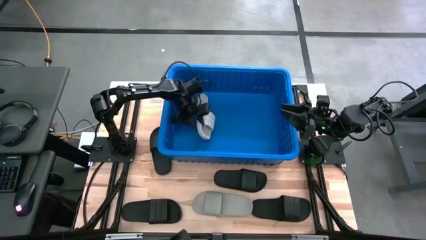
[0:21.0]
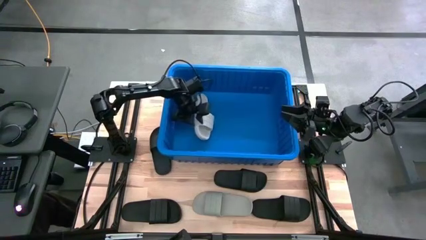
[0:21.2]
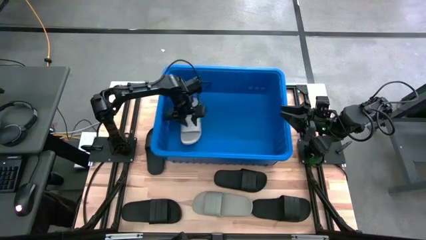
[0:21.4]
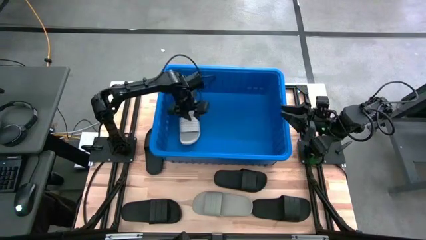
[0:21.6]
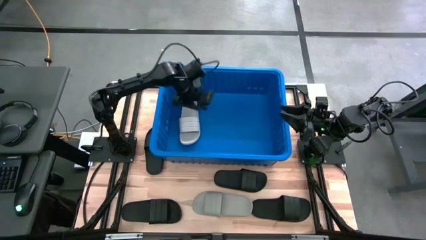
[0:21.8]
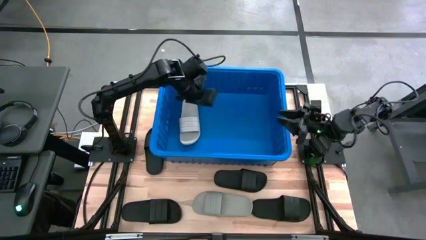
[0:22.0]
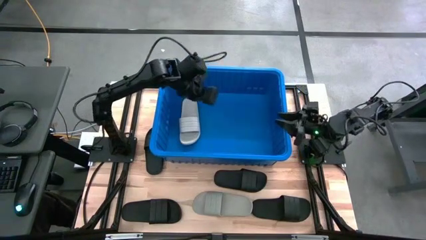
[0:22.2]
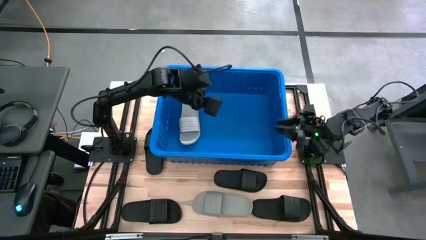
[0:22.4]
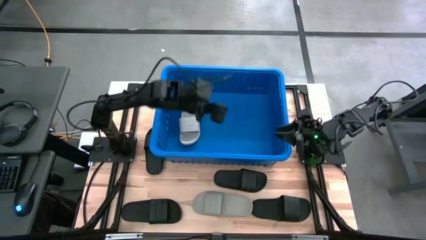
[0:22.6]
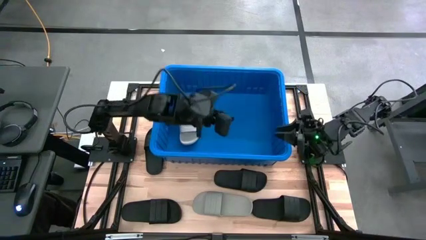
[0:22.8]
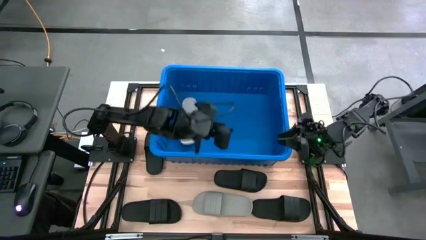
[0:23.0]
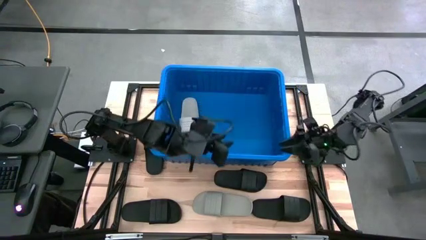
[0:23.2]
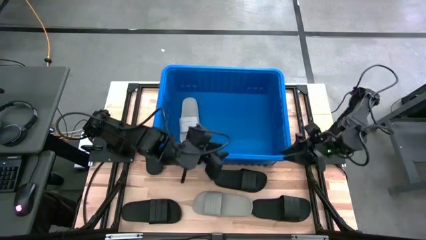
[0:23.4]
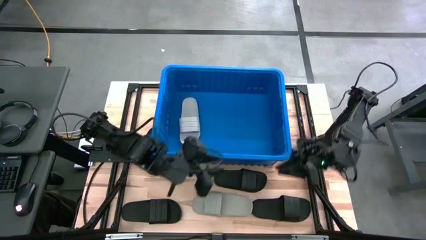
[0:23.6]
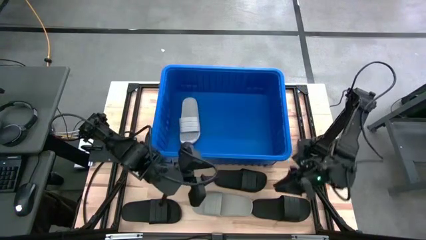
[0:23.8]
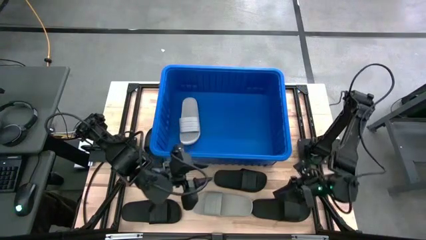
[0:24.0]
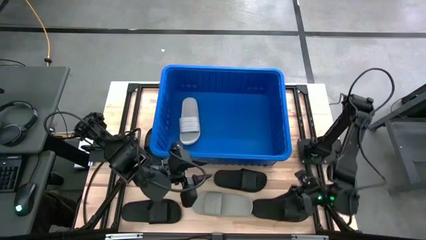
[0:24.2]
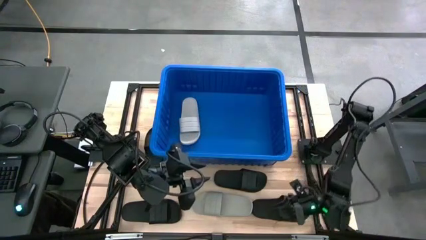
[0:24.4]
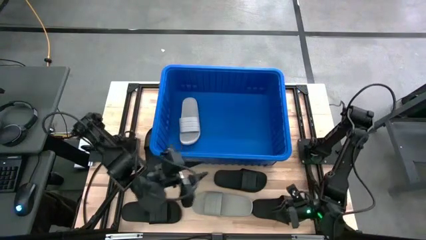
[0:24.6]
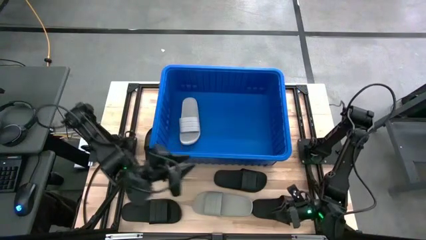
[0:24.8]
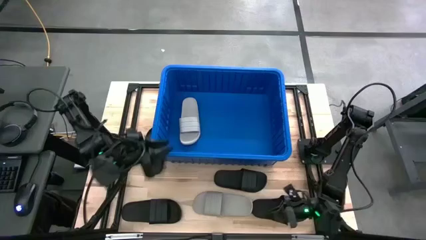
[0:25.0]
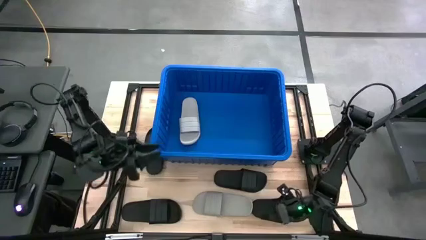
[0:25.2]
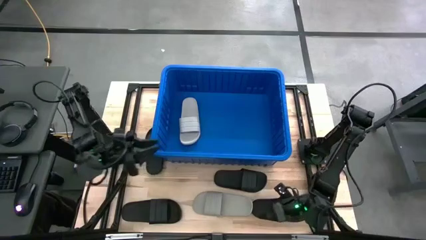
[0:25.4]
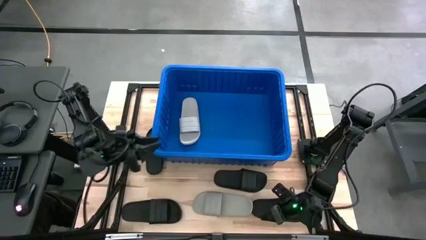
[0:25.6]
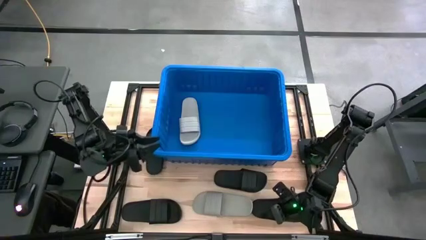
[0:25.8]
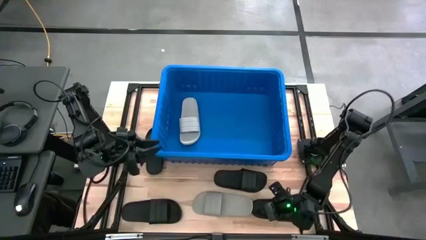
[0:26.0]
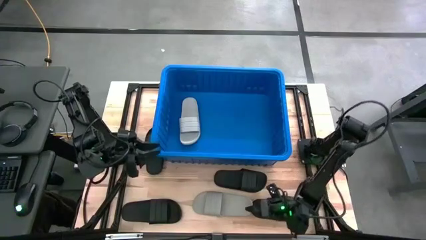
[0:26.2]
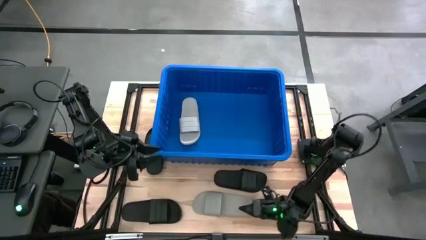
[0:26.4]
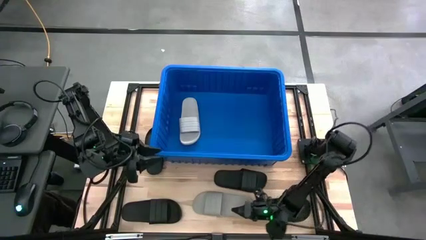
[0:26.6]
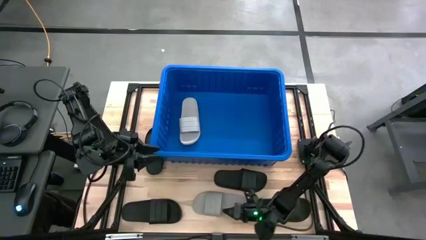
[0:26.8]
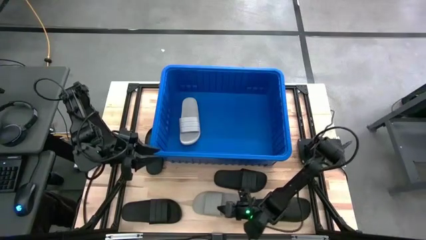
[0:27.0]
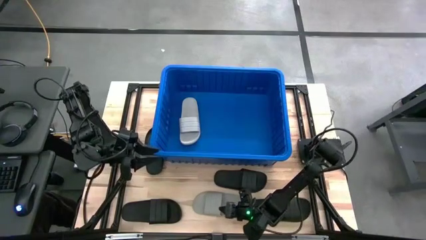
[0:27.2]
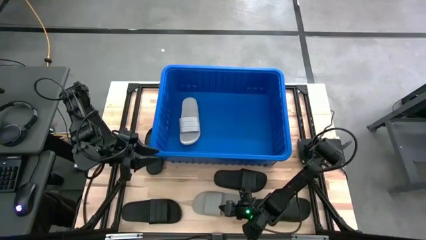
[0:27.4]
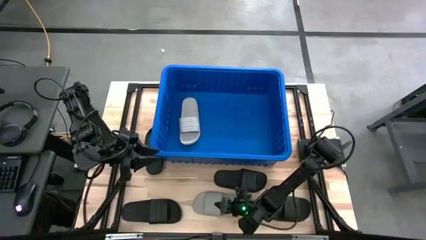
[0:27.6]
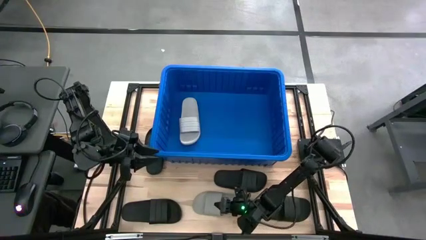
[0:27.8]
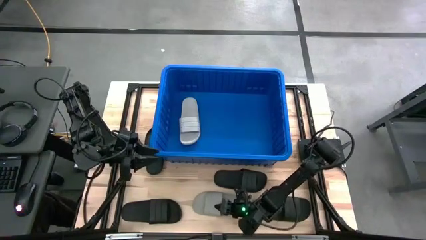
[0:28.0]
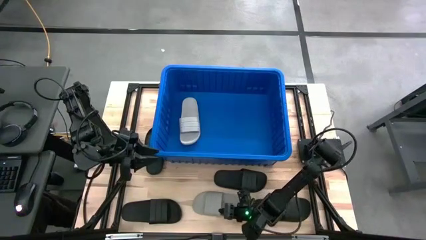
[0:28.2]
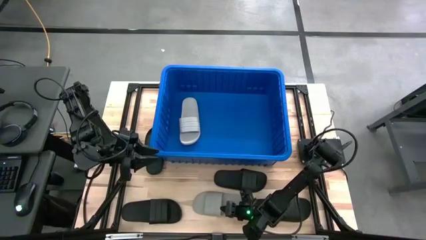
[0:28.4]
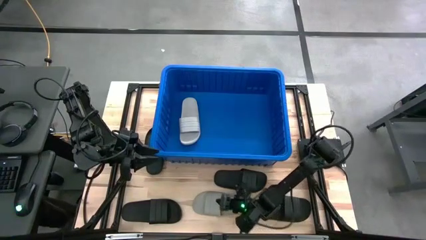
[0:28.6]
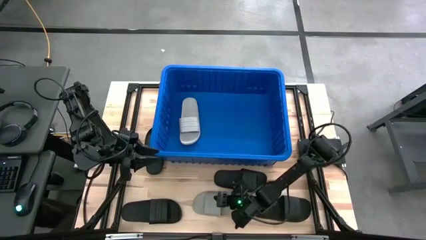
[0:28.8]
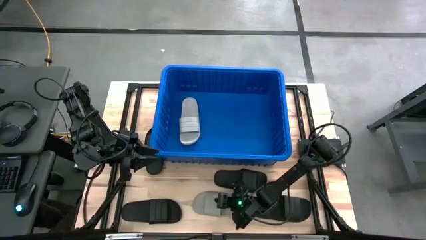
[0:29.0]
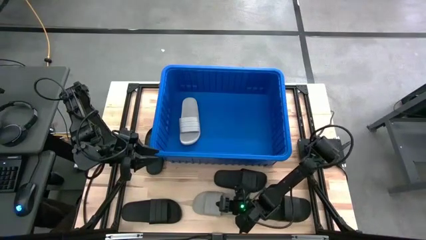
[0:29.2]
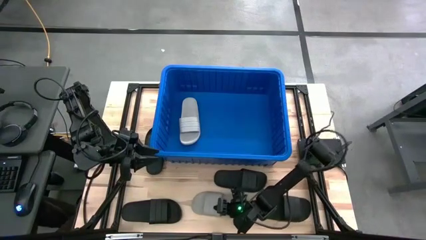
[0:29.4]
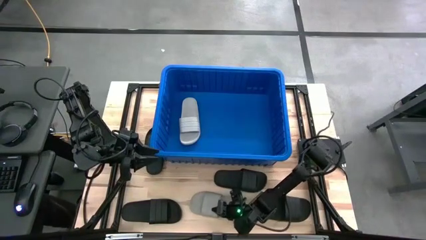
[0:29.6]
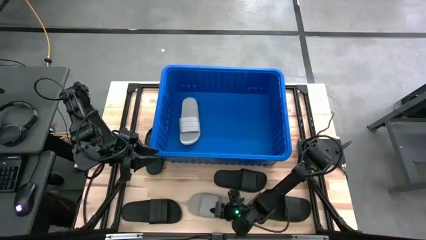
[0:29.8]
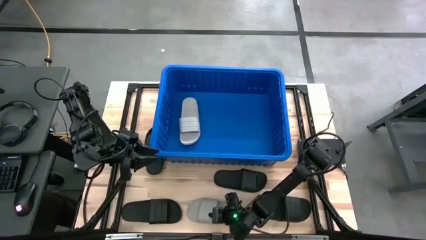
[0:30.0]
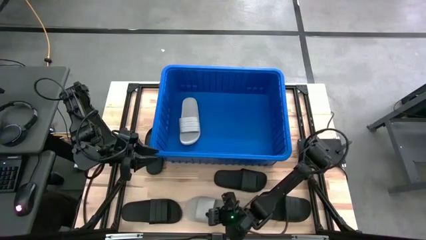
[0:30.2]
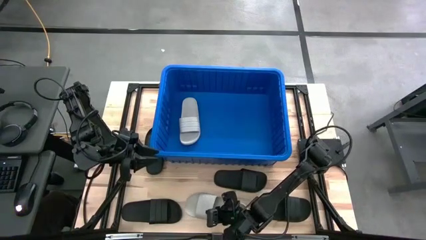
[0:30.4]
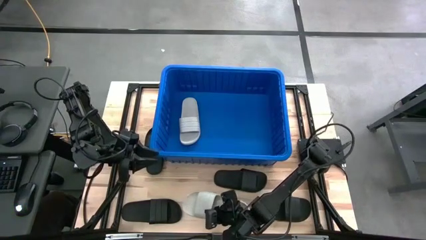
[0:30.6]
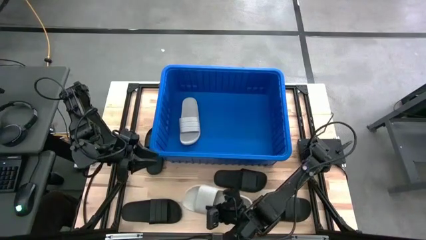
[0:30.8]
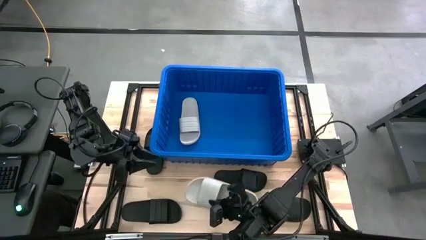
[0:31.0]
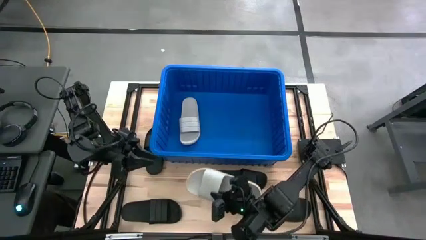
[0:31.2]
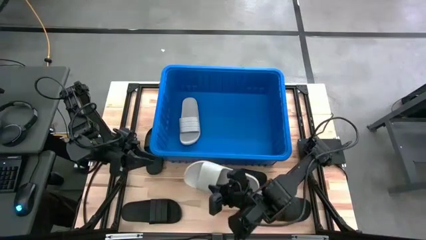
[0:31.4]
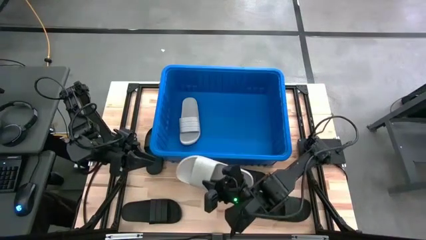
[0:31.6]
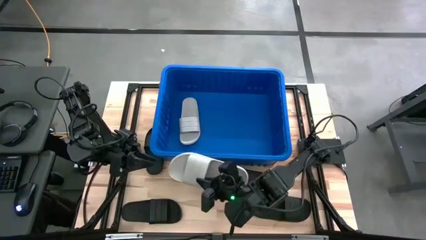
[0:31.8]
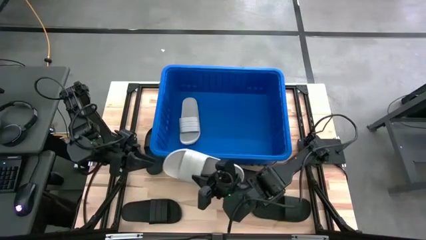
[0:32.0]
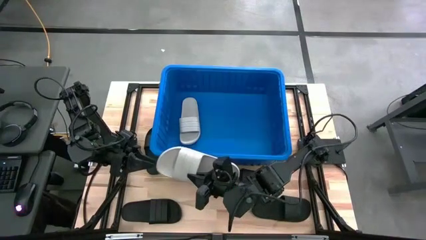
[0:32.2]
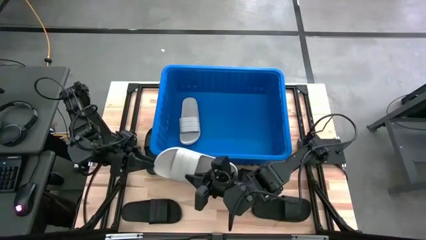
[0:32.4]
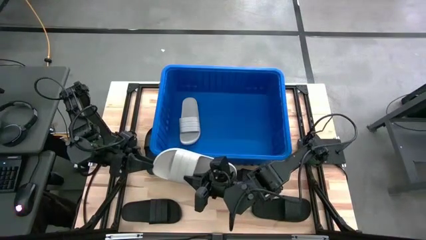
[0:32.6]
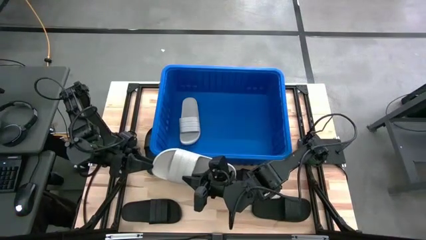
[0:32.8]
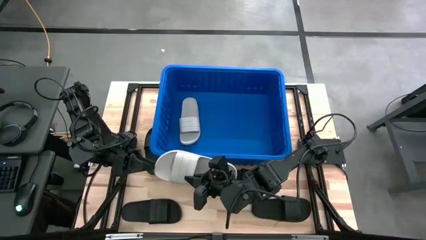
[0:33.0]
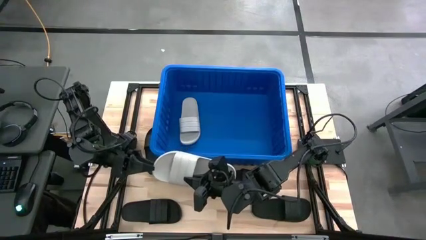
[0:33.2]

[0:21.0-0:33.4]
Task: Pick and place slides into bin
Stack the gray slide on top of the gray slide in the blue bin

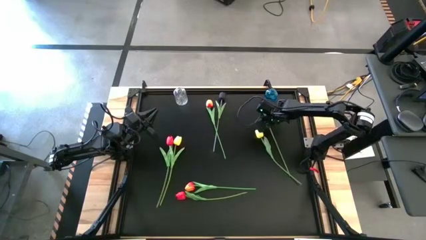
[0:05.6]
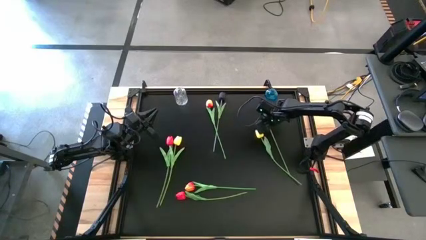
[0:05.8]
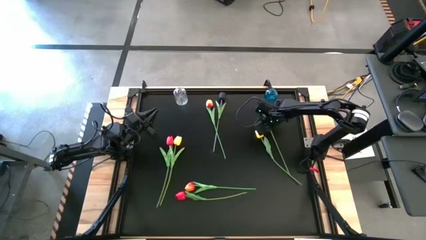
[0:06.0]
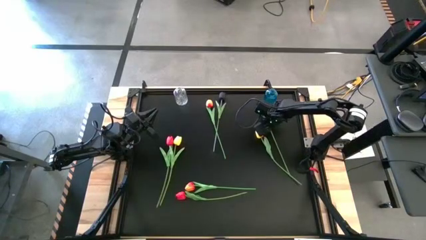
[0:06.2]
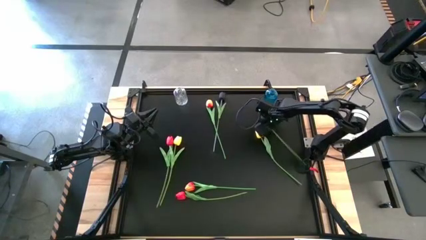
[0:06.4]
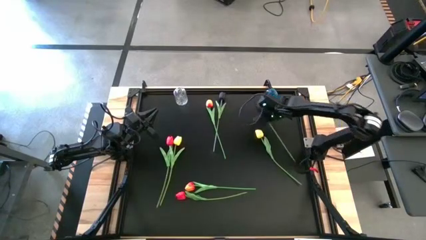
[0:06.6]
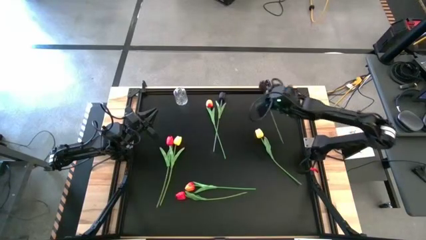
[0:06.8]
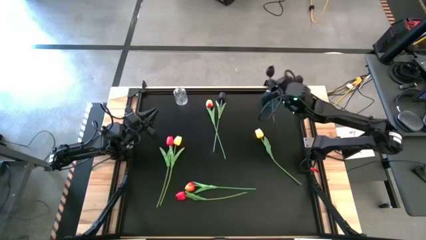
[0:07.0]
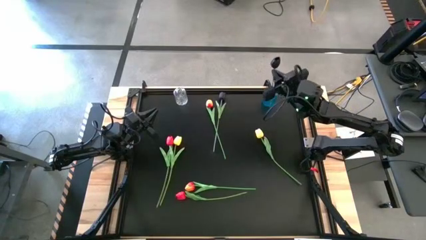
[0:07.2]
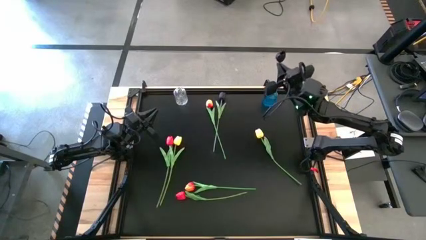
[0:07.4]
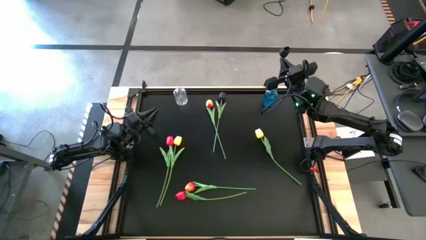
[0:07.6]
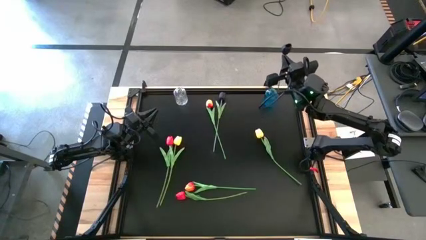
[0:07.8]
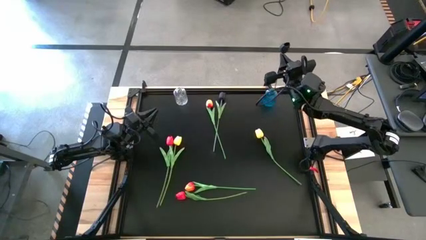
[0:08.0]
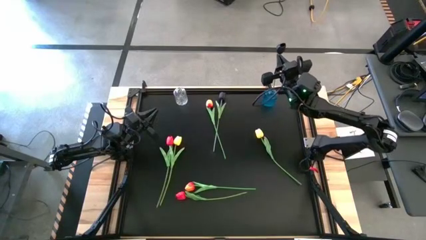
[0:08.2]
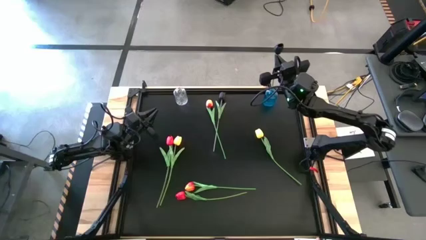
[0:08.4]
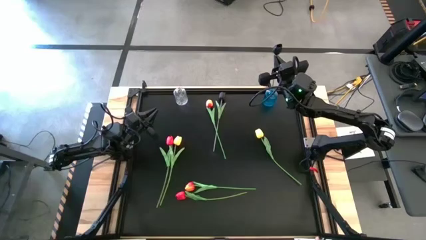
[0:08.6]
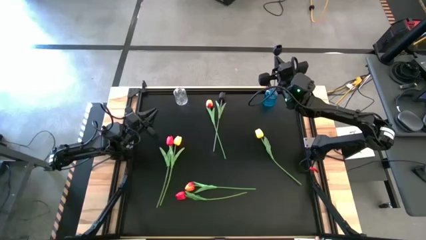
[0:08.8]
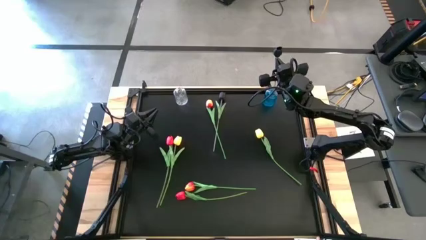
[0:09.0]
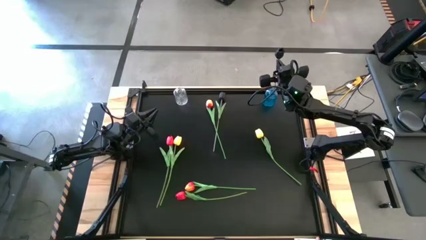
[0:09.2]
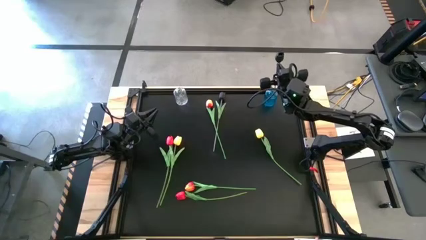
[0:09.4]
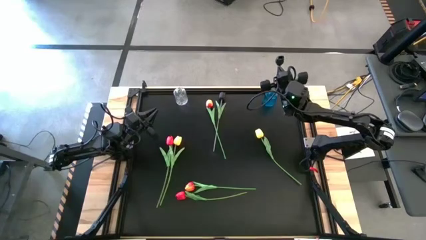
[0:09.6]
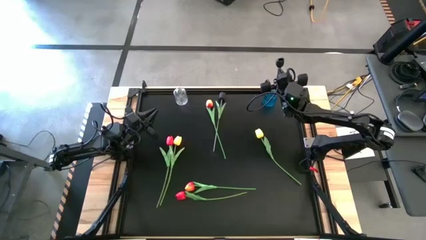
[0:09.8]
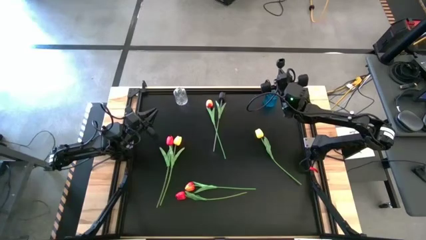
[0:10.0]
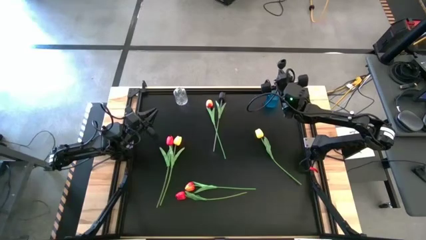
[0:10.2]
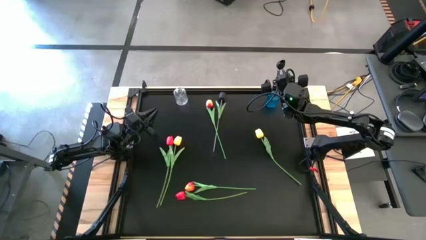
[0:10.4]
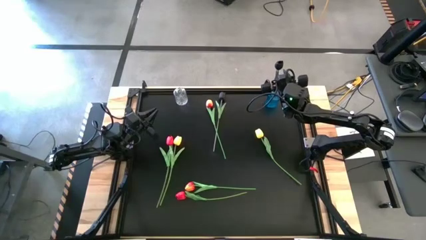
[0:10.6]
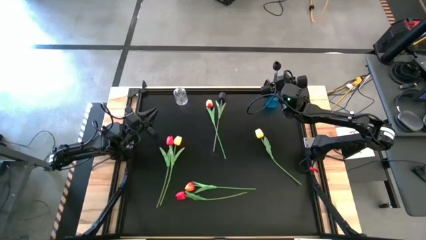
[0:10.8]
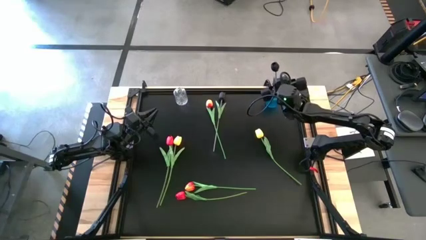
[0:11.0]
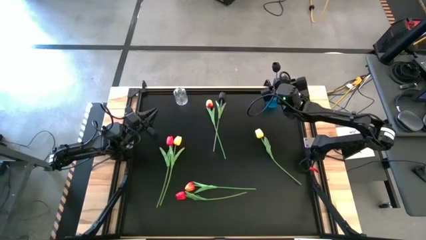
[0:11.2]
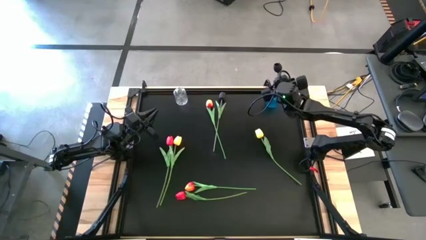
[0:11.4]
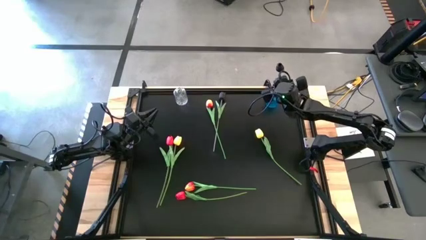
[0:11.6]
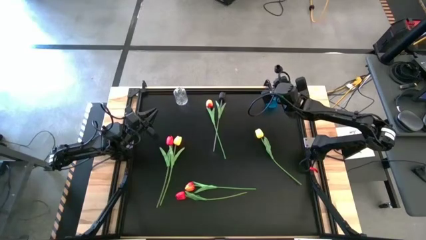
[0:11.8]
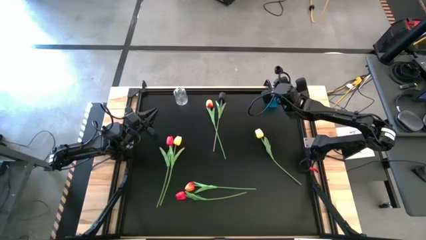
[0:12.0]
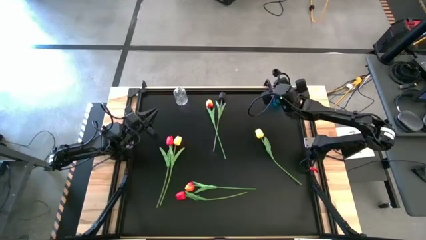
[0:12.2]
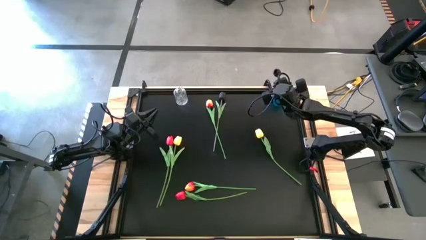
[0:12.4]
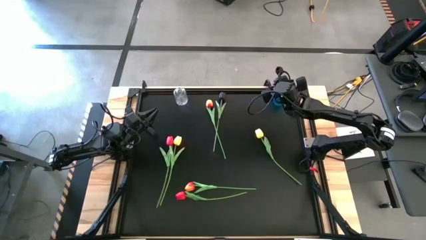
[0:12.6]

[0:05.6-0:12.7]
Task: Sort flowers into vase by color
Put the bottom black flower into the blue vase
